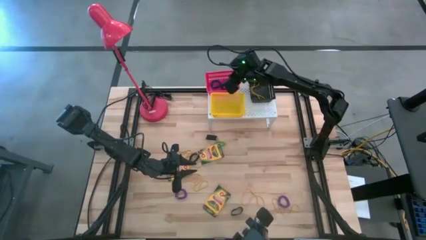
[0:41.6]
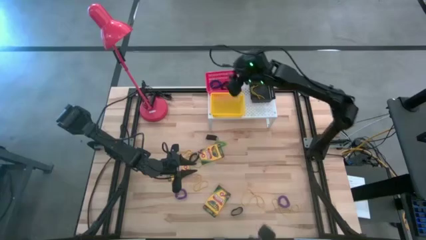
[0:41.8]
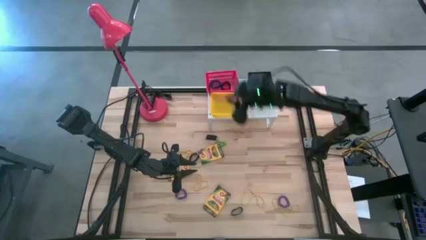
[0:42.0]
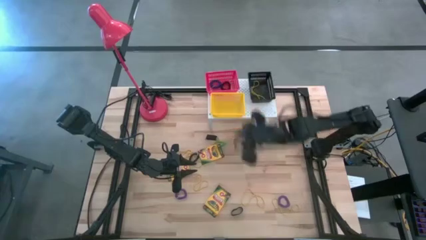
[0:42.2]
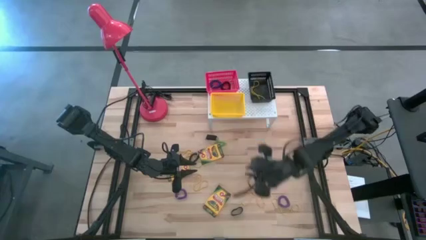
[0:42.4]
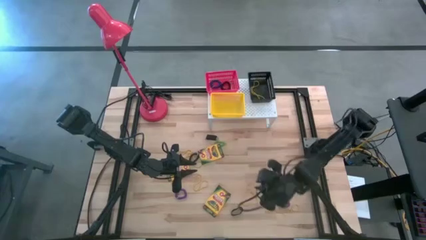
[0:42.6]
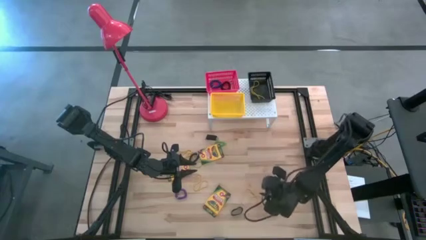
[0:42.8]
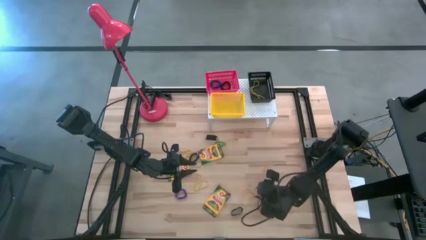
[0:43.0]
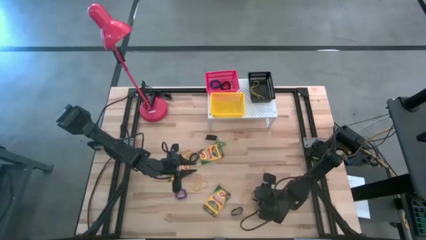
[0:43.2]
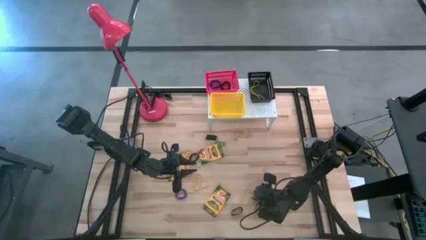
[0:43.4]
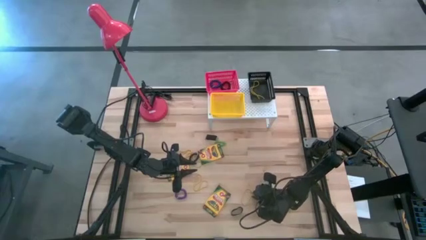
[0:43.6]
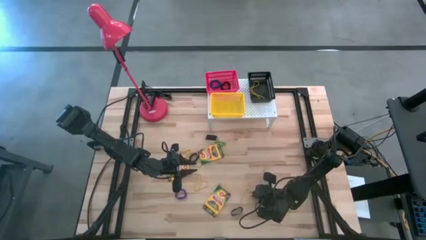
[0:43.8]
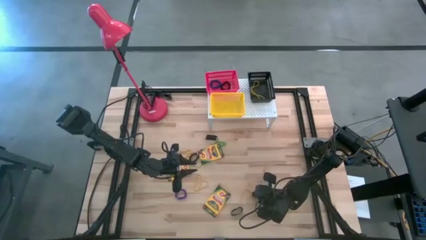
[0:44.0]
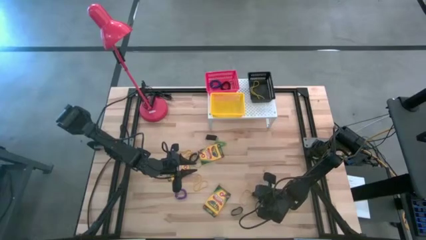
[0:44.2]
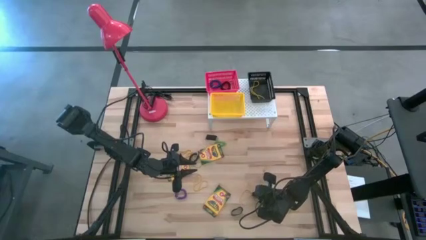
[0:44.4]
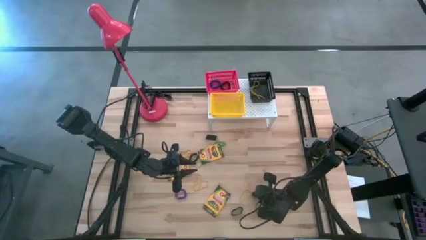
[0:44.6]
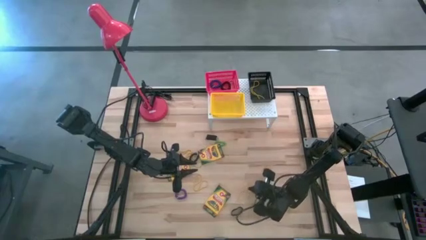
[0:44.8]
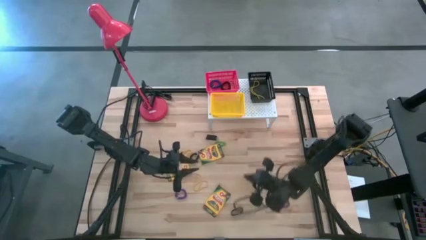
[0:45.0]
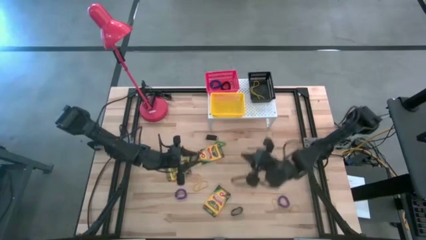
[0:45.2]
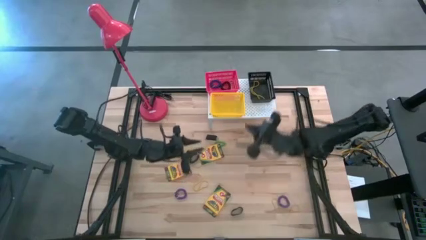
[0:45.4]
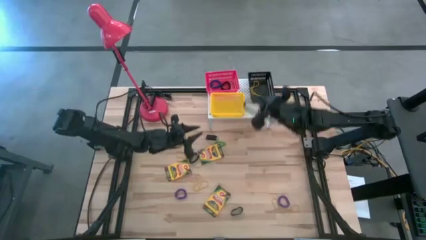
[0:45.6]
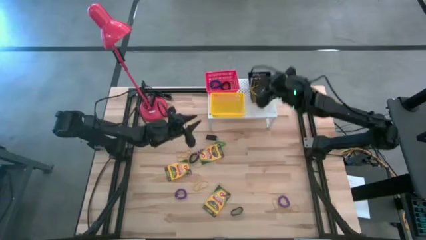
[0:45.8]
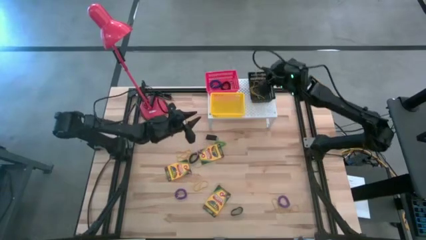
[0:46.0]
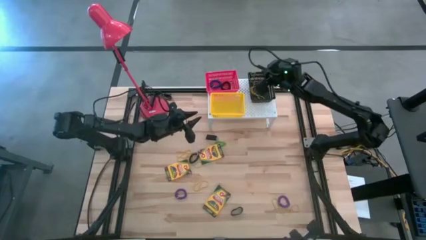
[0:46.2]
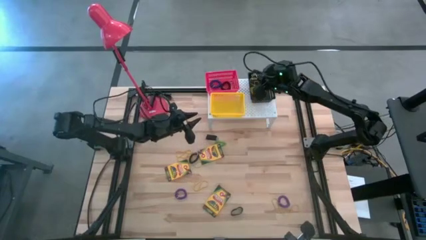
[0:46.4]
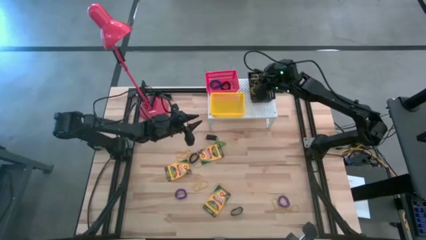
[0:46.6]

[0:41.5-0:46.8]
Task: Pick & Place Office Desk Supplies
Put the yellow rubber band into the black bin on the shelf

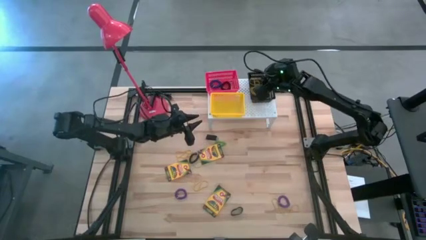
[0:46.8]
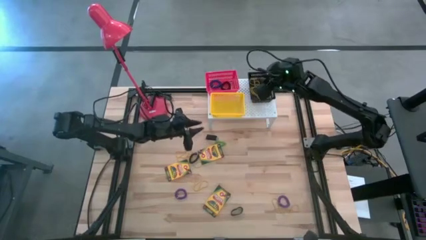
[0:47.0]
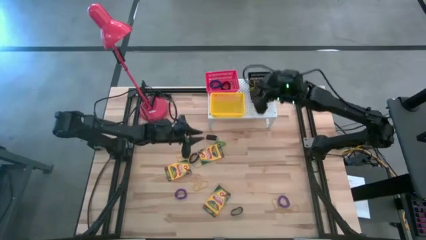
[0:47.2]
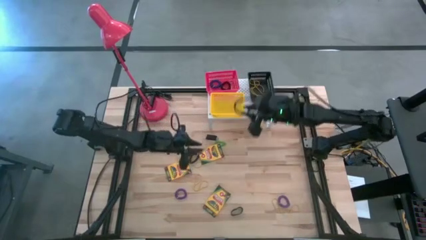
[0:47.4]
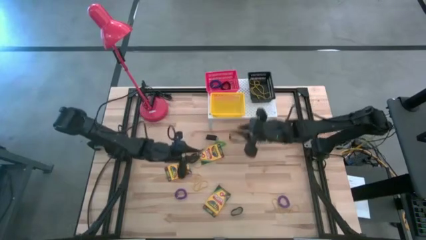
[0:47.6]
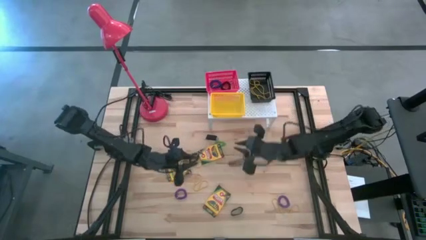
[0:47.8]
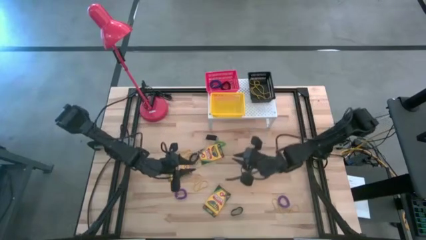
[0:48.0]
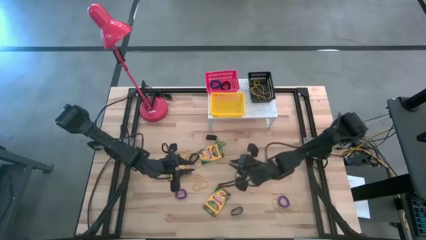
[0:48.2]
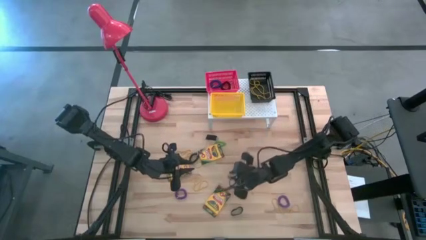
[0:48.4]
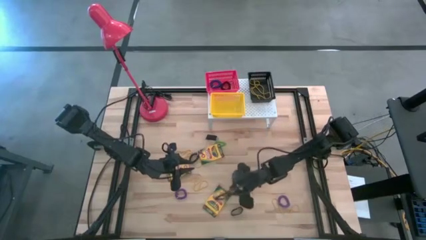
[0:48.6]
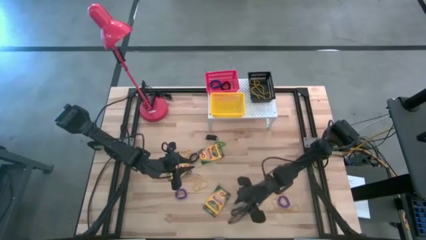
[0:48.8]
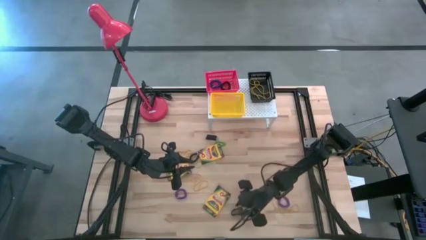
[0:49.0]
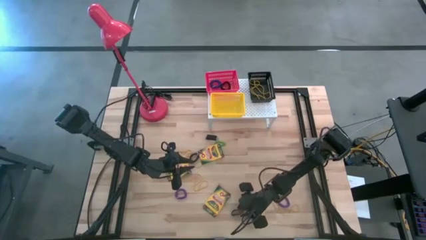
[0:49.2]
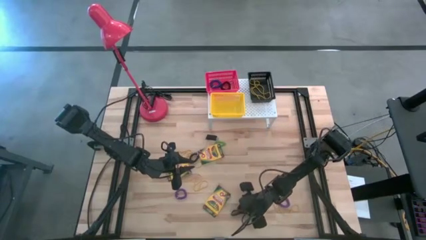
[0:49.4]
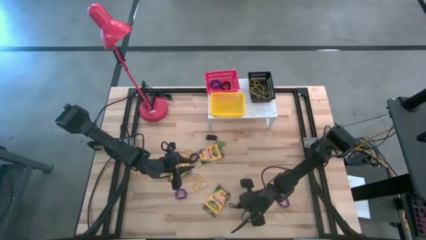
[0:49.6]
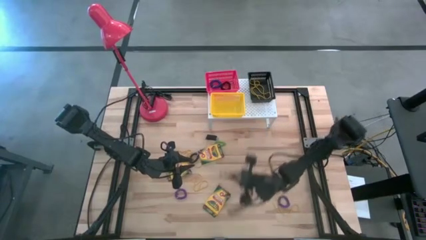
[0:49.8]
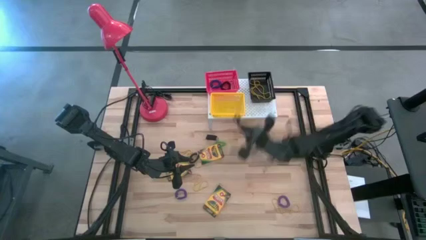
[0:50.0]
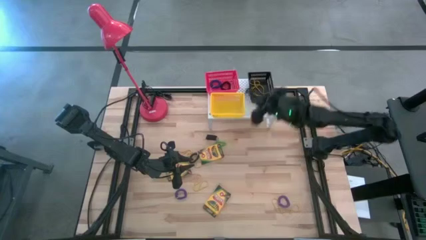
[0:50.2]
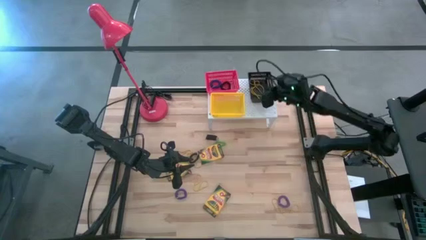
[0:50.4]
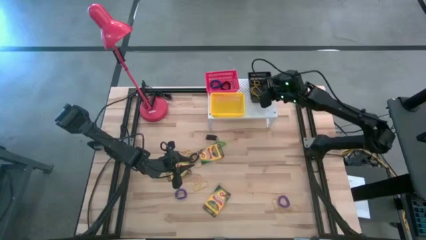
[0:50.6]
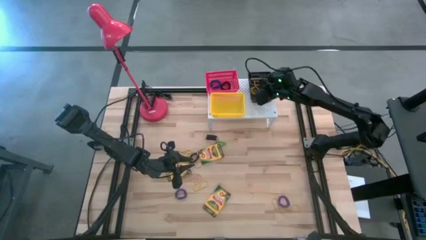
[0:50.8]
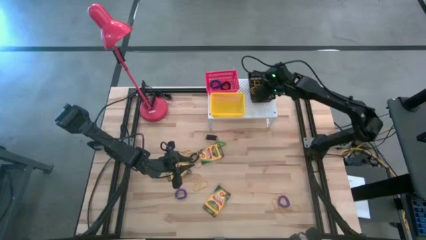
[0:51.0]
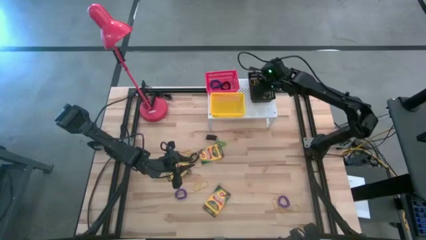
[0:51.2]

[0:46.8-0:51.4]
Put the black rubber band into the black bin on the shelf

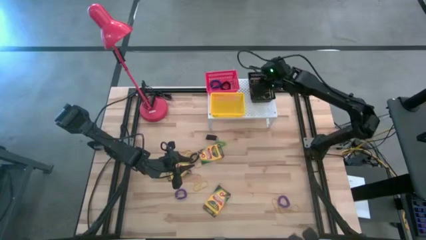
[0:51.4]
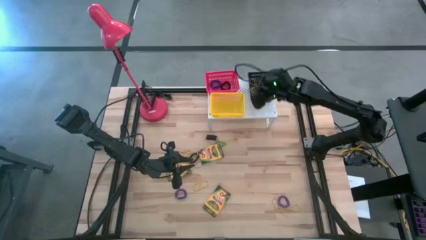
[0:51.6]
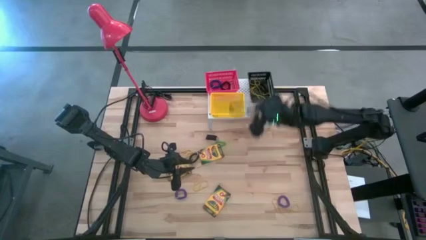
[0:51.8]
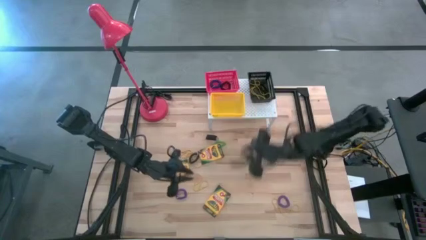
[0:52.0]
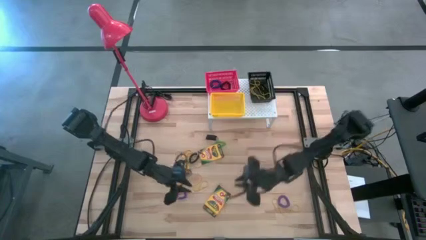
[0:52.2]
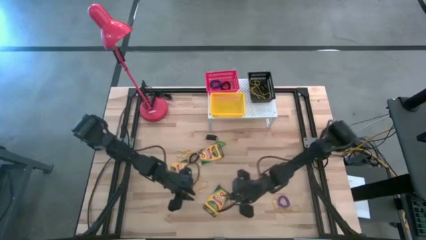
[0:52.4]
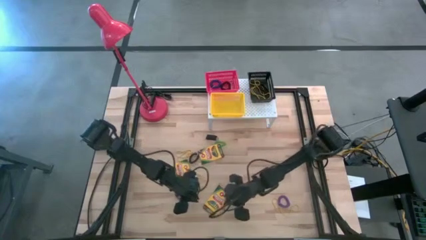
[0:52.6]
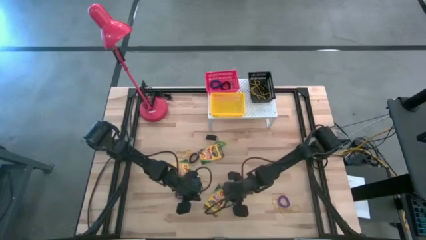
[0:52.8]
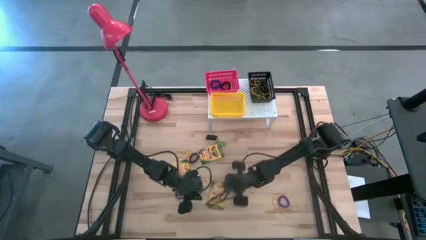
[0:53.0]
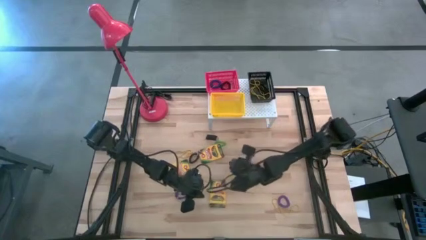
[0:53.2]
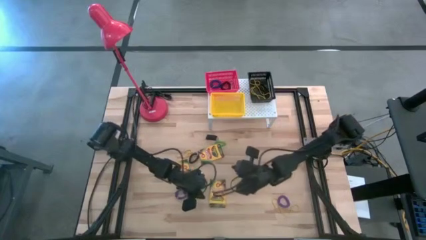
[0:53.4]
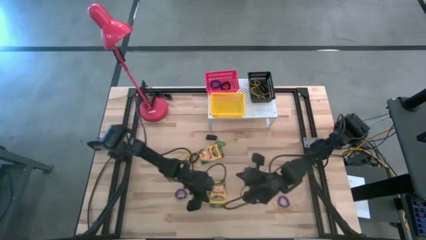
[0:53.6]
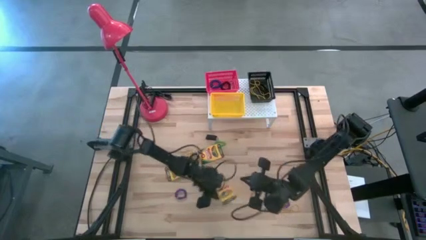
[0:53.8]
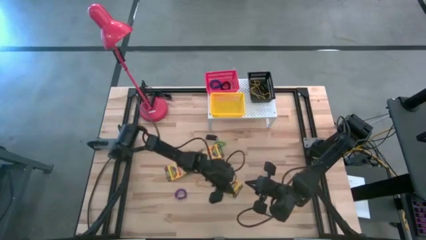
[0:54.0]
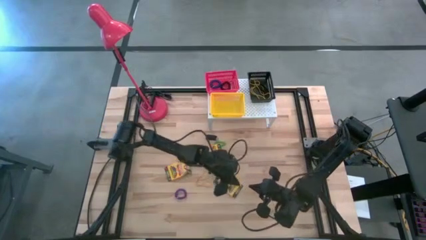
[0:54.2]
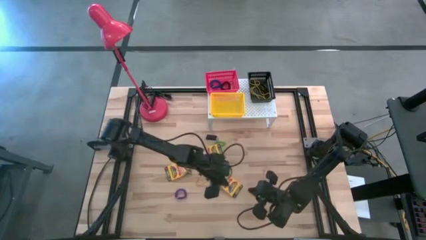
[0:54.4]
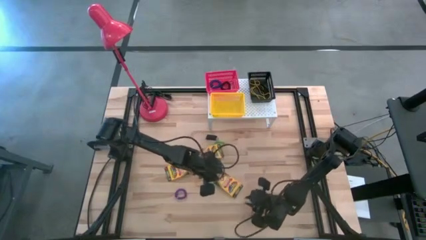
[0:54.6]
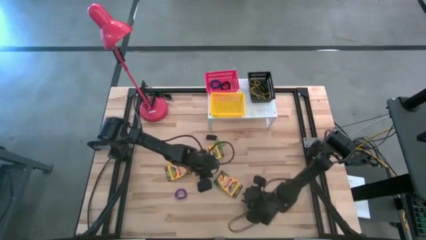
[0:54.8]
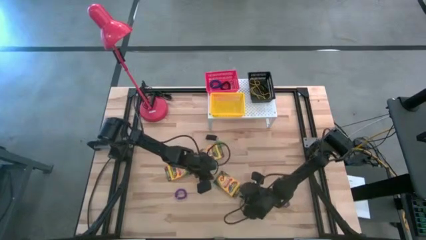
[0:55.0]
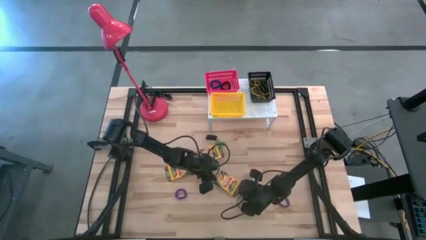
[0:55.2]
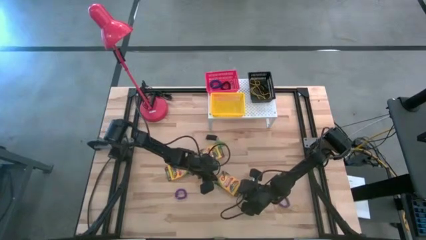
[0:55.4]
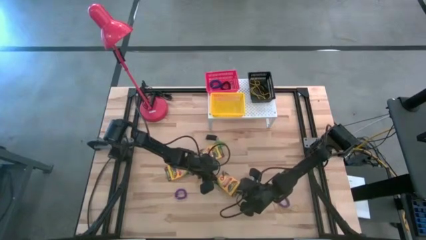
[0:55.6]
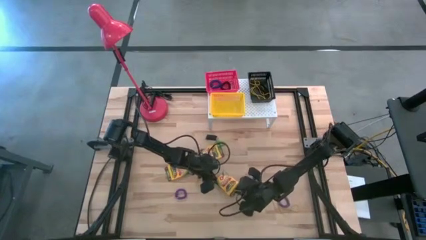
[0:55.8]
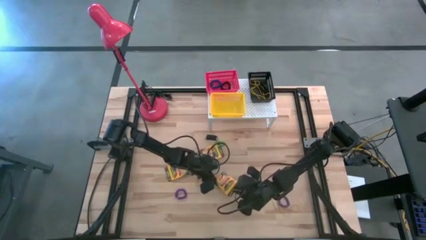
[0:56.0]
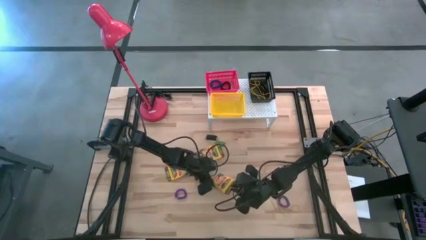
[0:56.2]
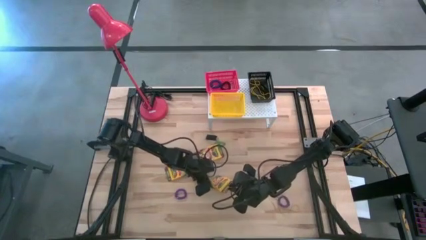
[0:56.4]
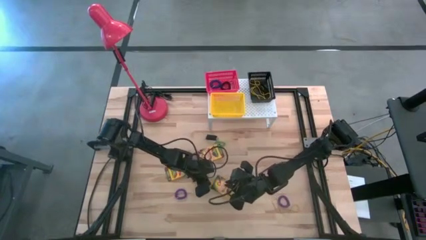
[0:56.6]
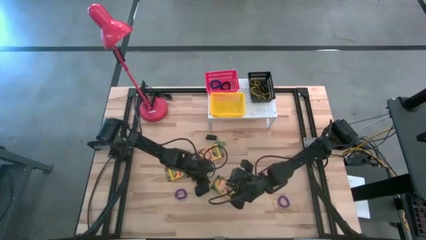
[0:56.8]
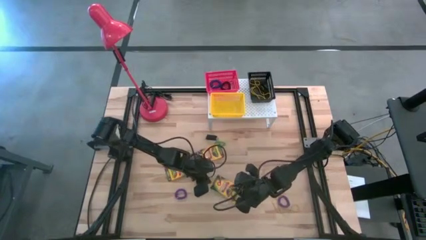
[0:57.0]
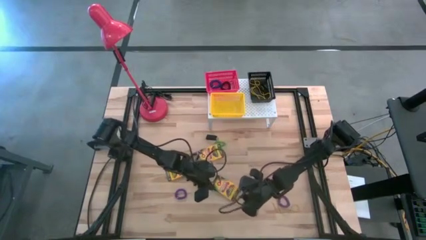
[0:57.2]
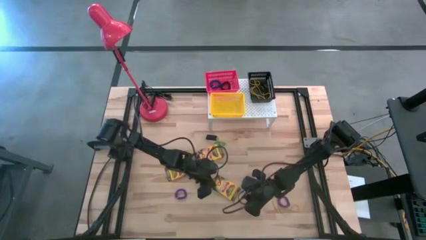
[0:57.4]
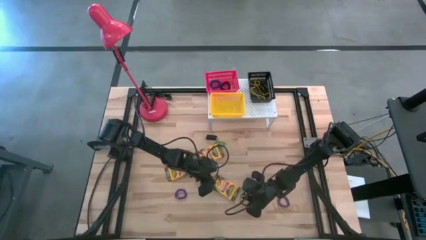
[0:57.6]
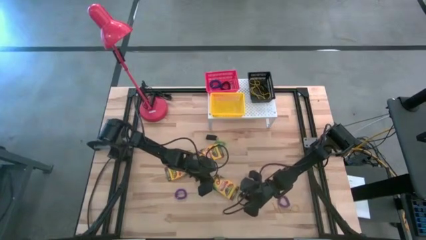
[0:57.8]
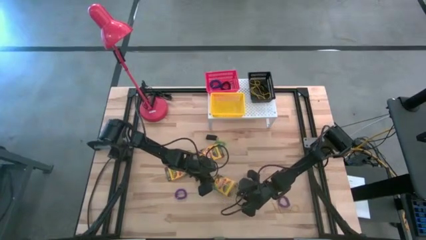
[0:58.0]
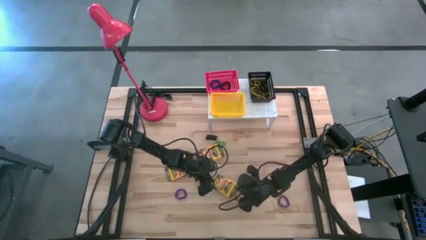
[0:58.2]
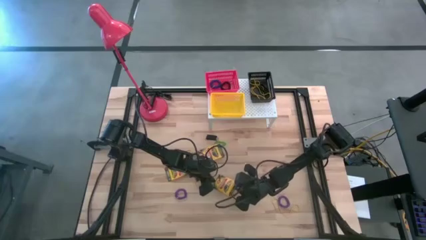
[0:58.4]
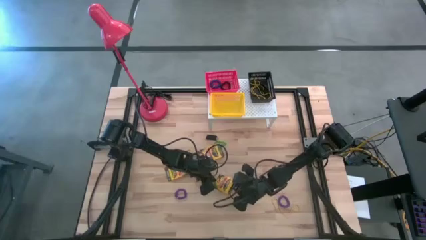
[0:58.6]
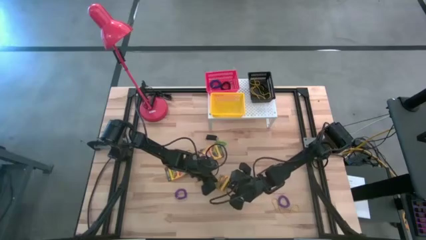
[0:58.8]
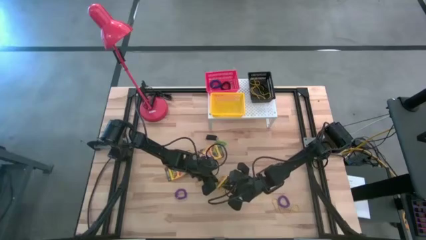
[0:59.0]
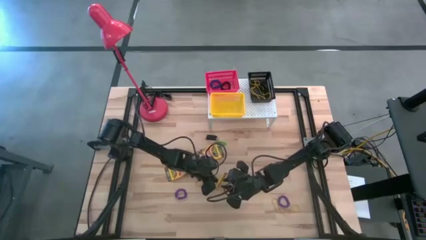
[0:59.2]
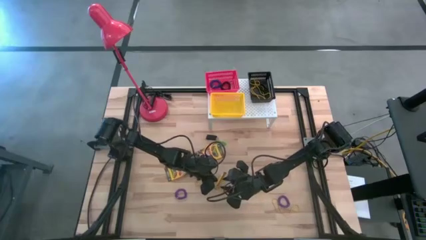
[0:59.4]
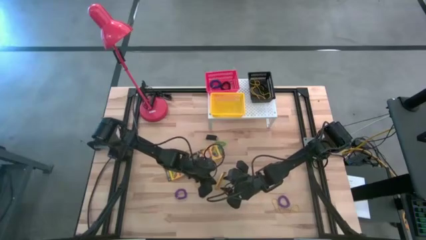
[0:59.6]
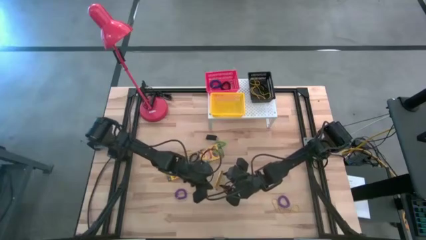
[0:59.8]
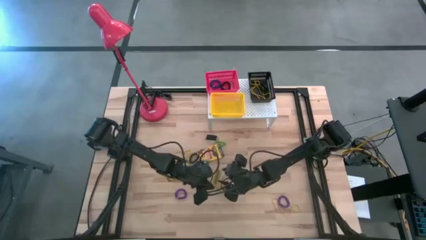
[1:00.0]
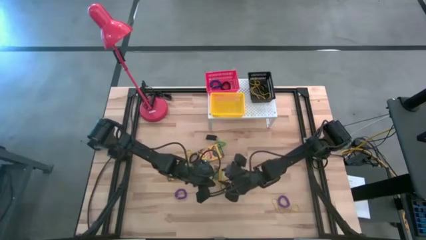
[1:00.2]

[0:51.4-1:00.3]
Put the crayon box into the yellow bin on the shelf
